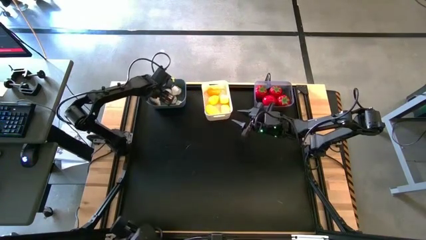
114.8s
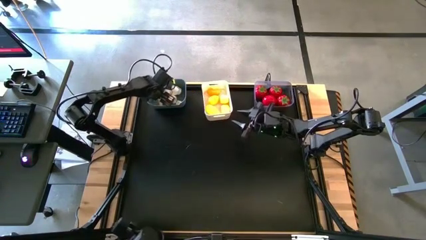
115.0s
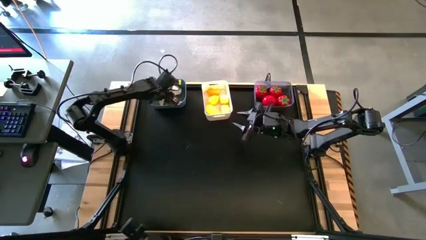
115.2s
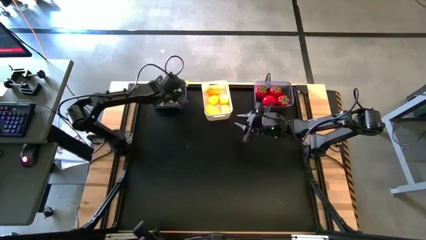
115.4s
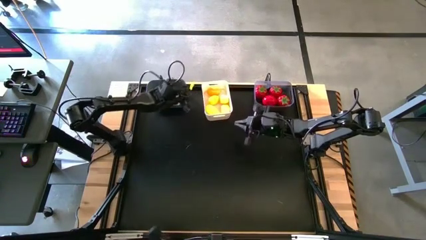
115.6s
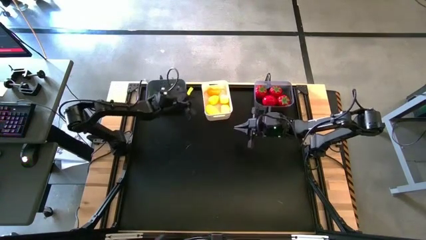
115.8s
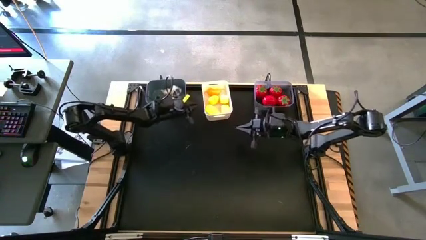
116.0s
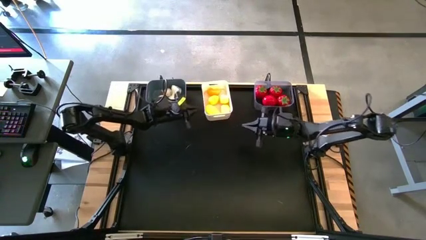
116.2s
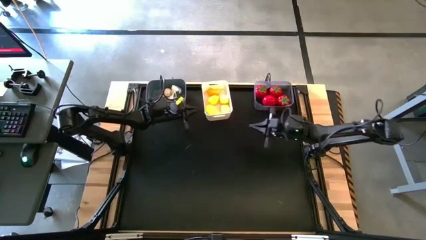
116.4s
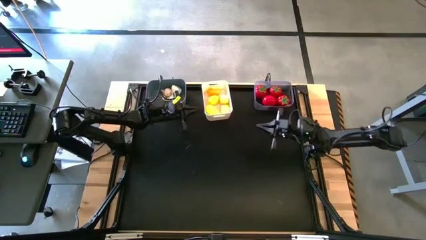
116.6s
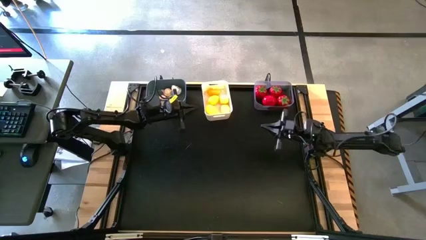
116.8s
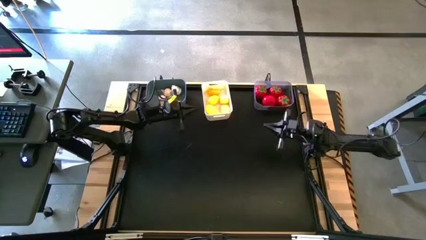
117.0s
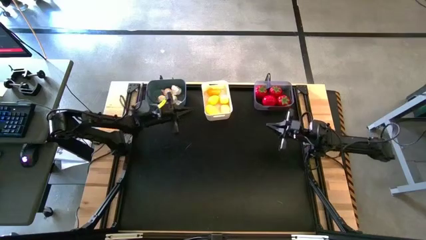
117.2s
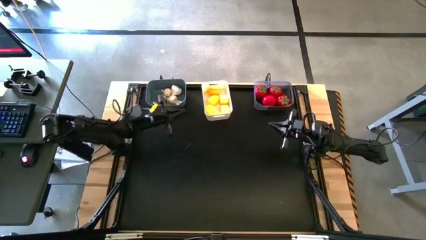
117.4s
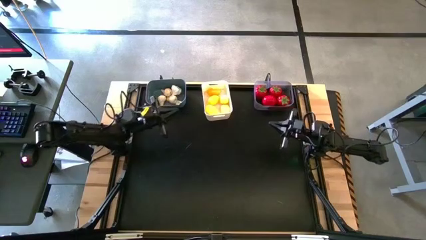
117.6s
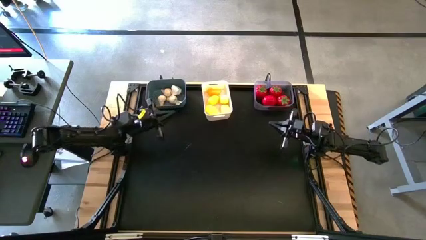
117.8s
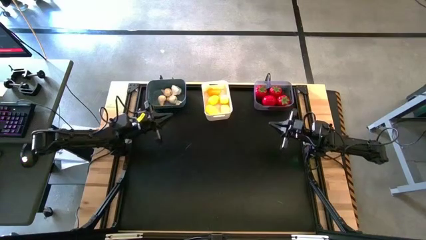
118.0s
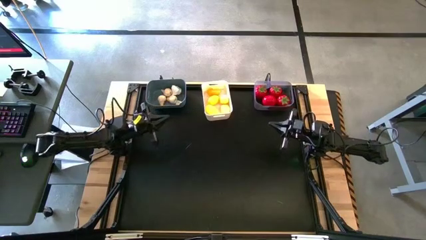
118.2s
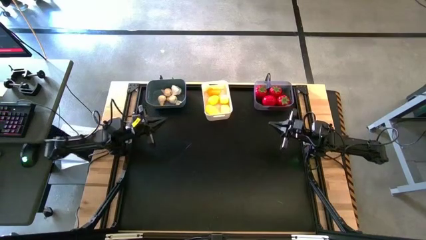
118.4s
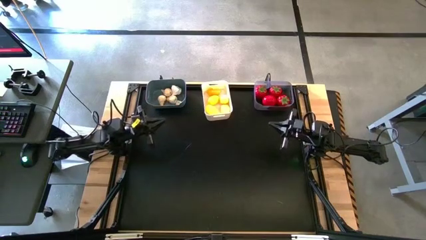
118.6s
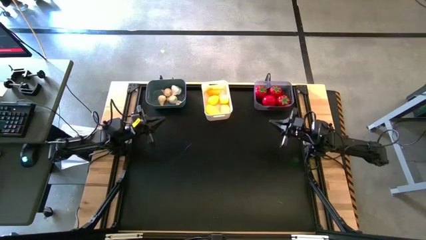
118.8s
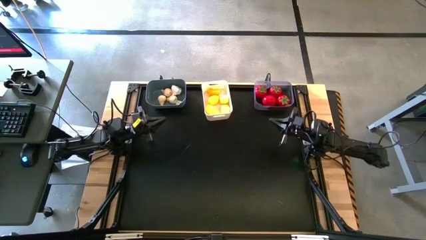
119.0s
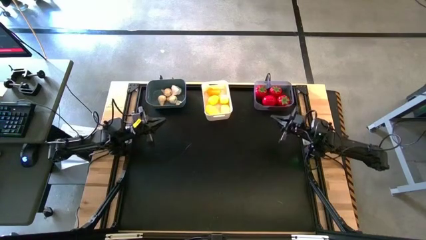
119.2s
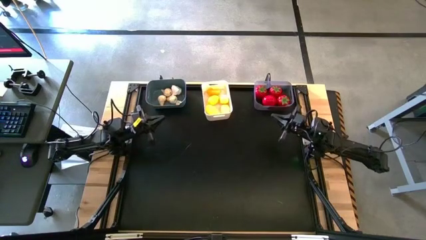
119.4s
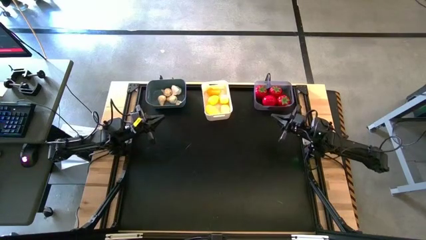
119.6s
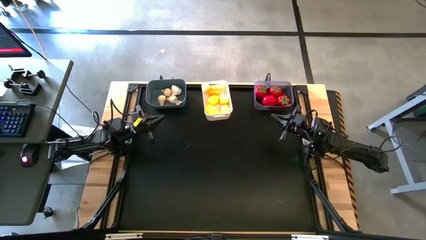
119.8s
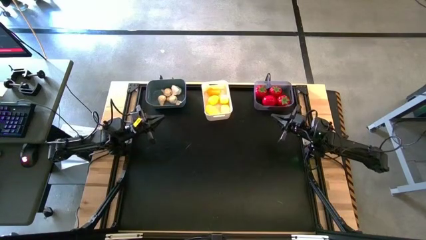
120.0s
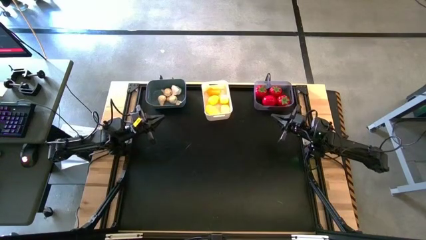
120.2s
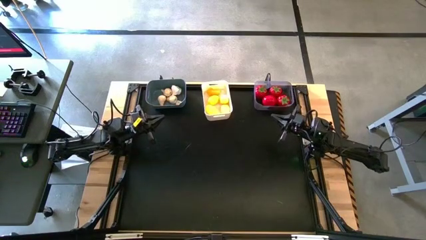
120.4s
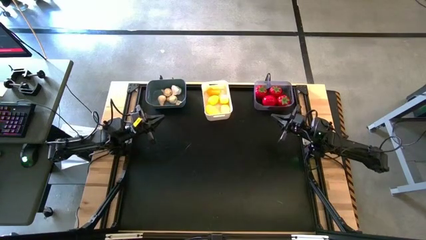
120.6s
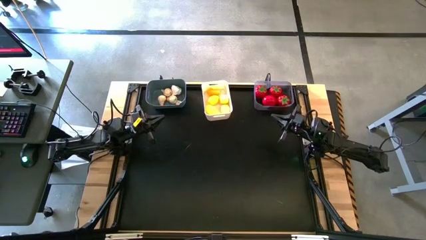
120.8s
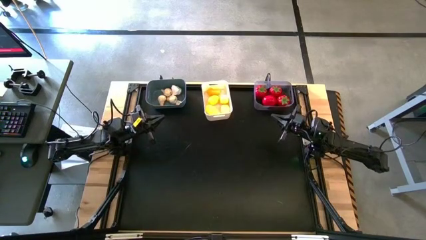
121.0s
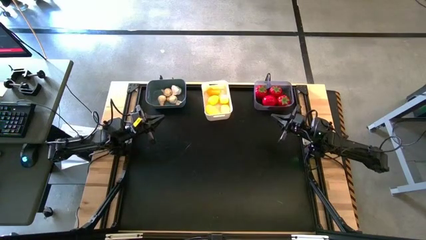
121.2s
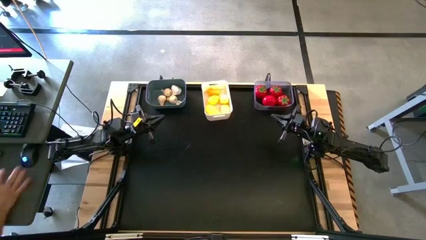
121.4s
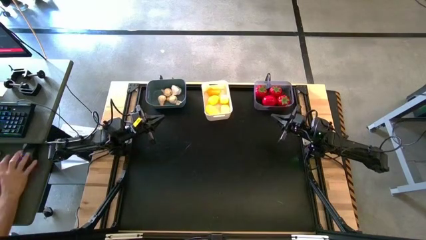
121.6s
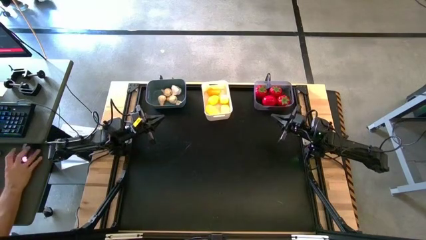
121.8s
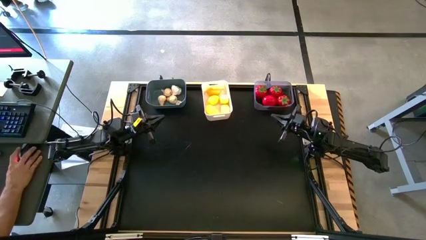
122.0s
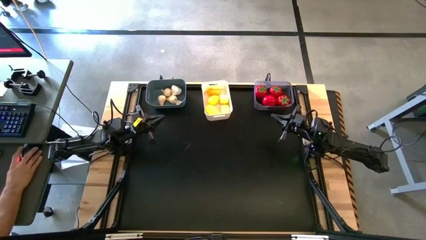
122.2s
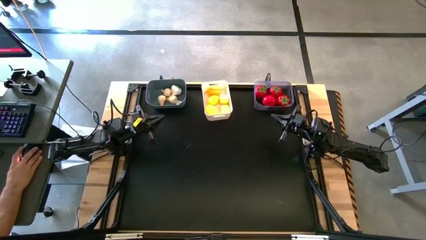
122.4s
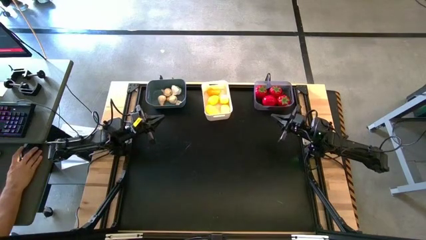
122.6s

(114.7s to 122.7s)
Task: Sort produce into baskets
Return to Home Position

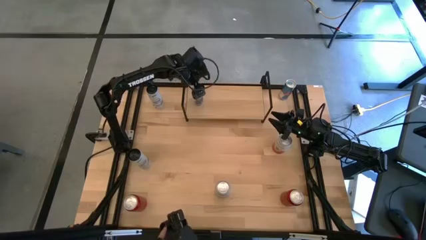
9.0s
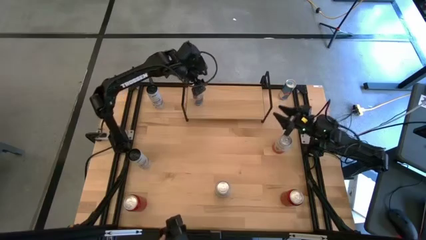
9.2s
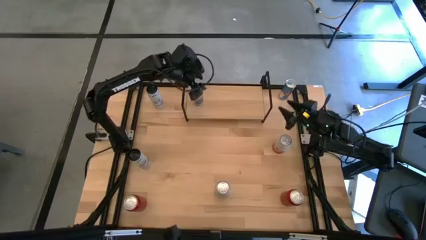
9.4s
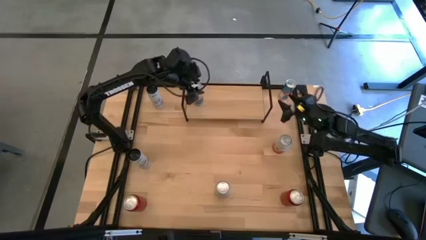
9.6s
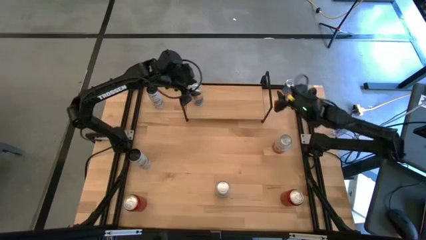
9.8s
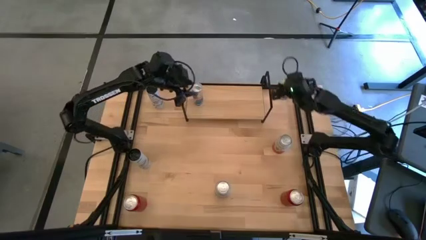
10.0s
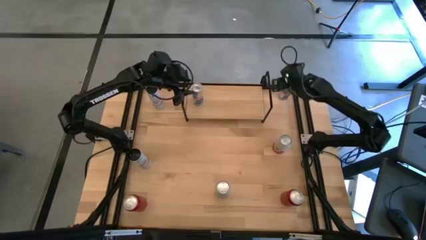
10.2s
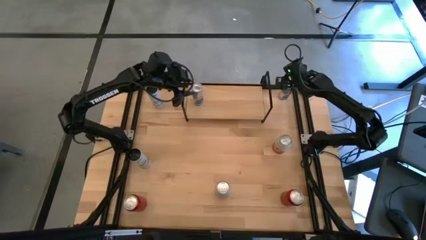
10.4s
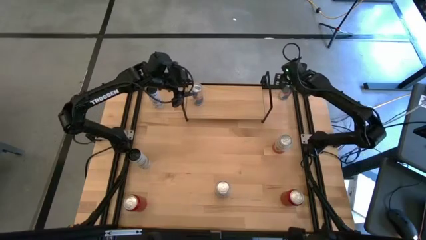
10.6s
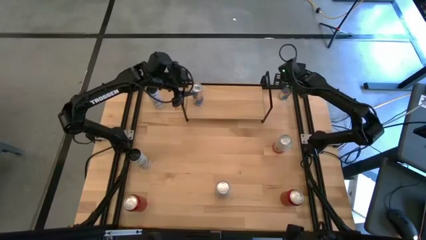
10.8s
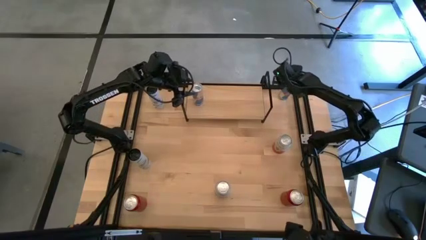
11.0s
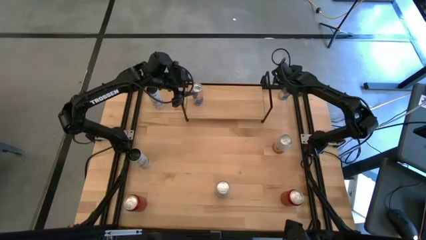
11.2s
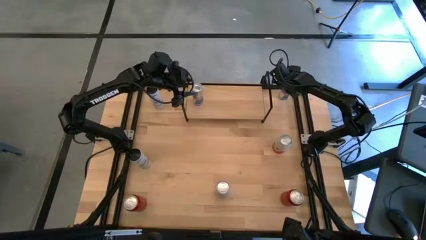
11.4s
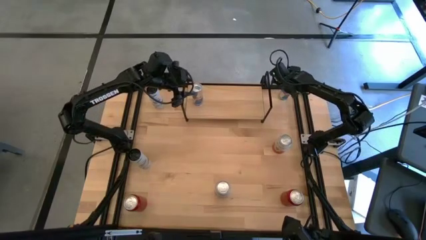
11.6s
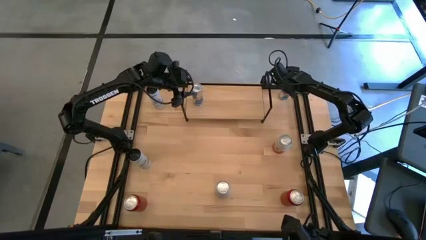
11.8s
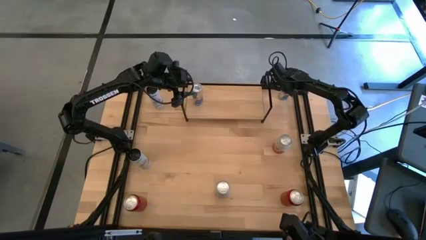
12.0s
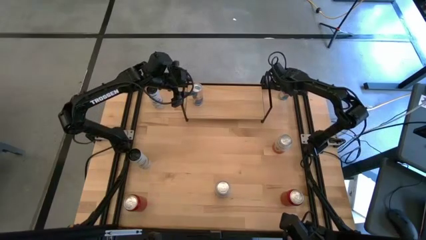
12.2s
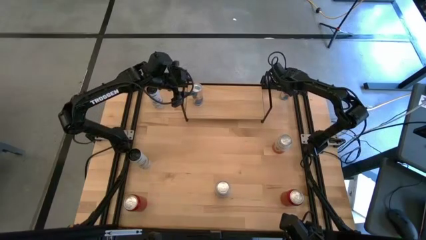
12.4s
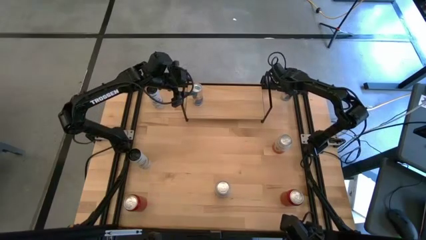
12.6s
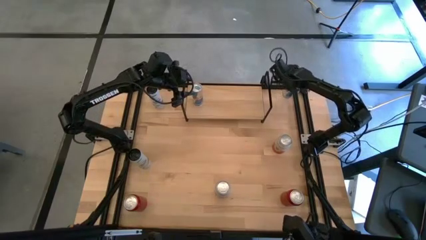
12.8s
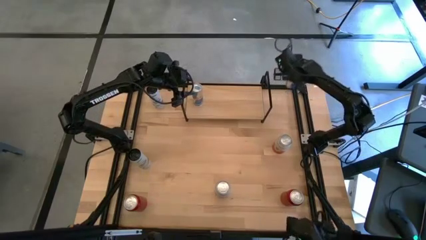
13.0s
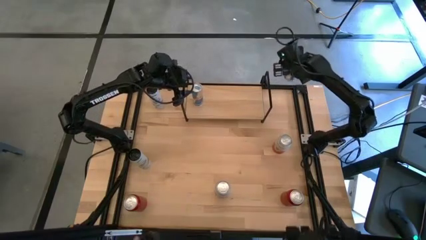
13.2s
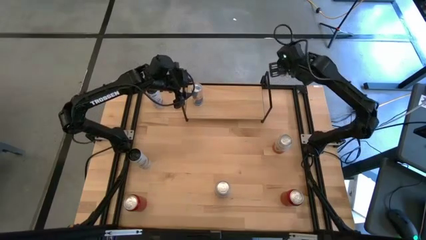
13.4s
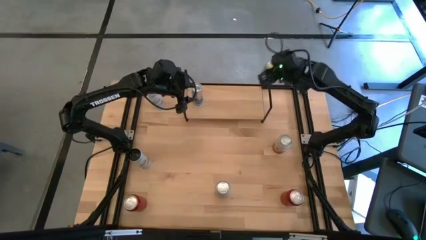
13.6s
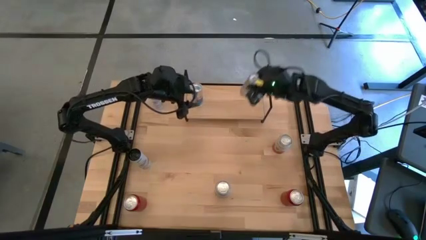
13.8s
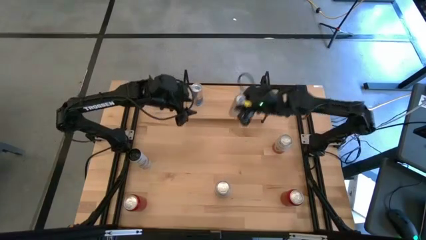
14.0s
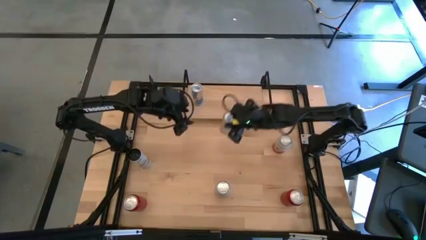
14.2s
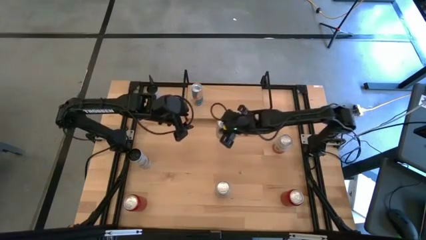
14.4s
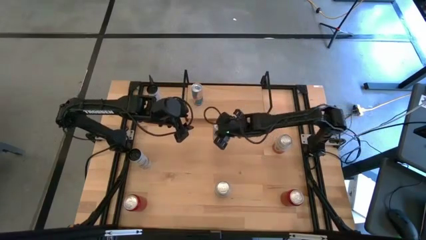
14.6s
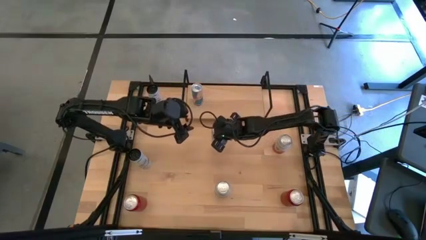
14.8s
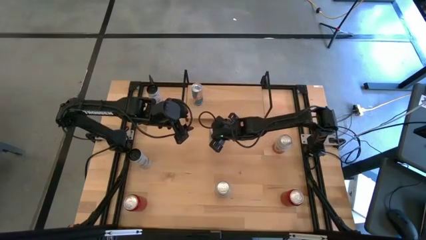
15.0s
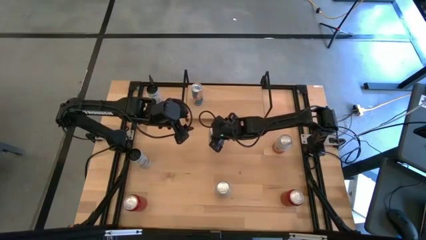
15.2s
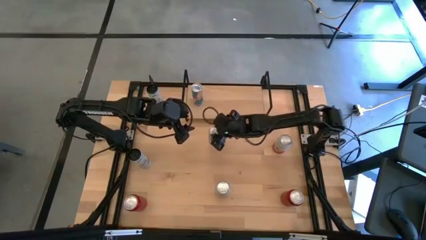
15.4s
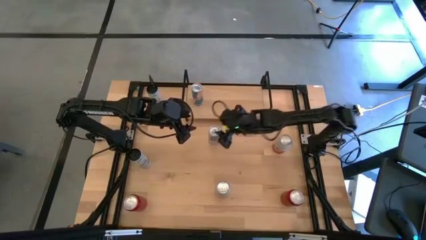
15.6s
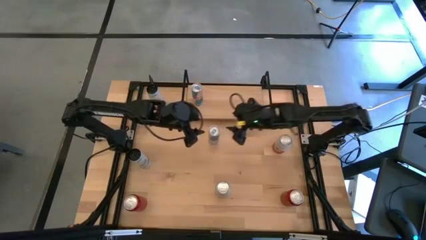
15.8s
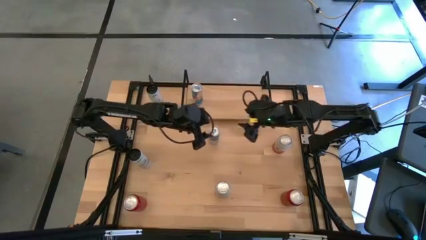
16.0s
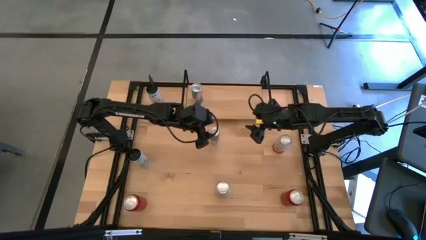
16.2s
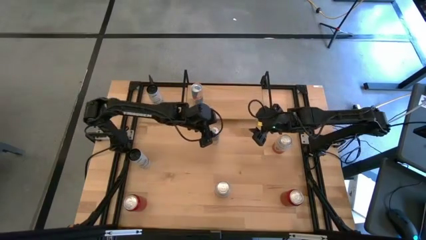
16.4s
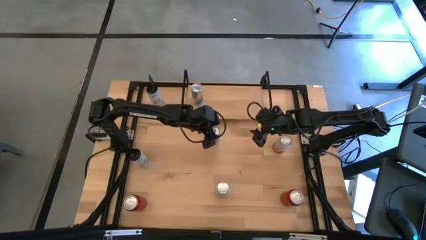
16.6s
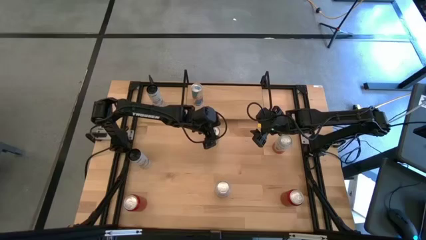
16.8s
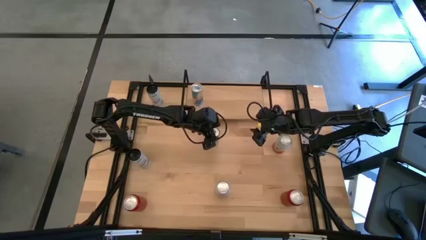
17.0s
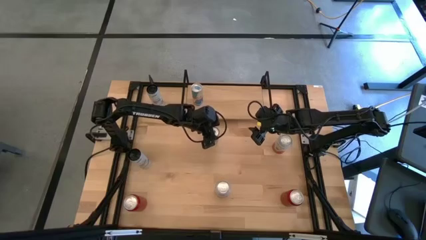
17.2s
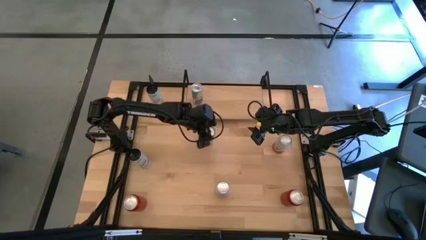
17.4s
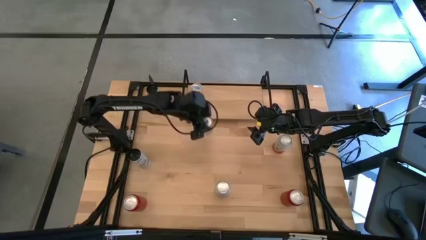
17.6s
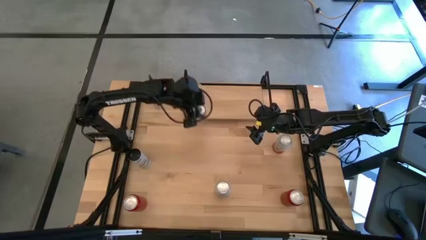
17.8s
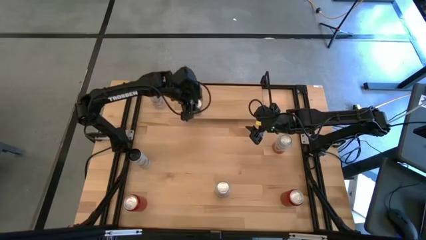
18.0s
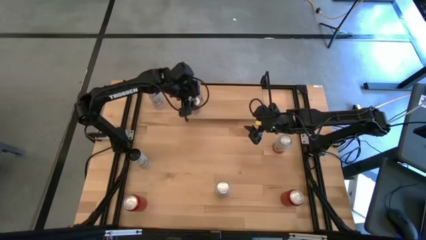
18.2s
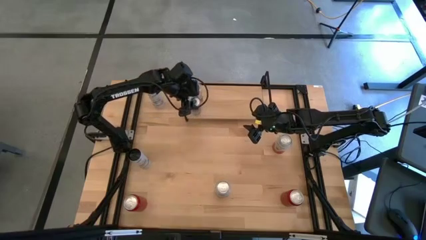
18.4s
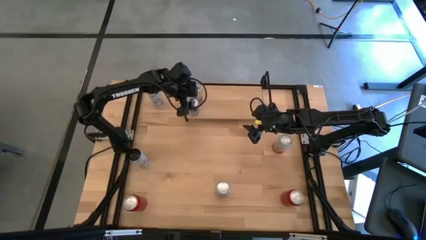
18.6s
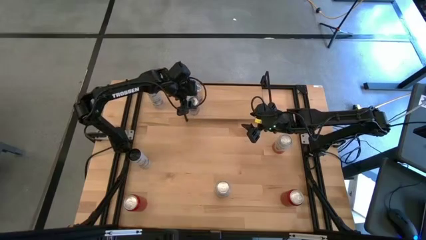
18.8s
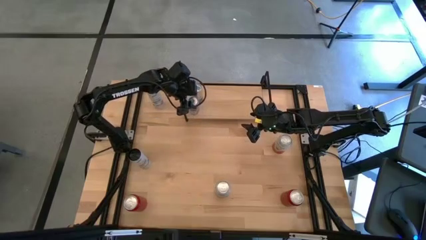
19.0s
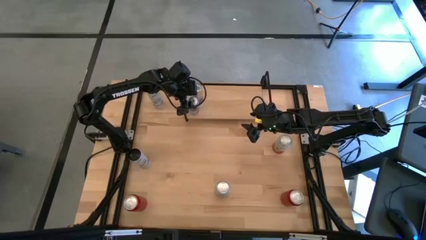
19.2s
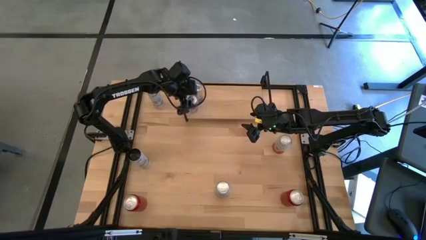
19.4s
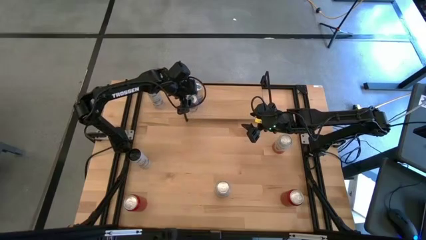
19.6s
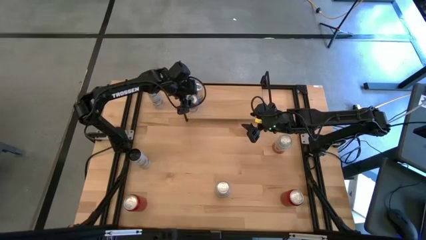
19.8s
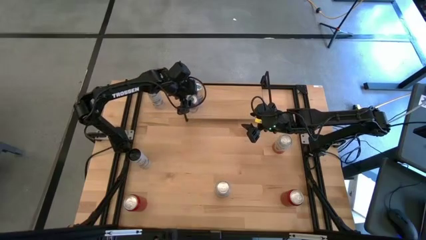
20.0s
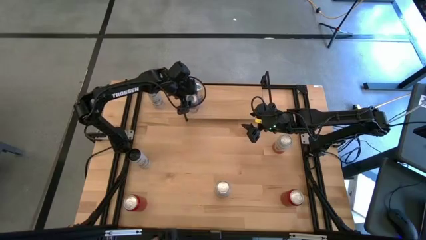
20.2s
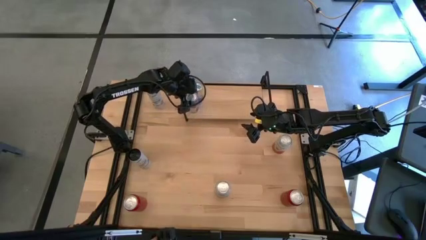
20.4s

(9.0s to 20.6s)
Task: Place canned beverage on shelf
Put the blue soda can on the shelf aligned with the other blue soda can
